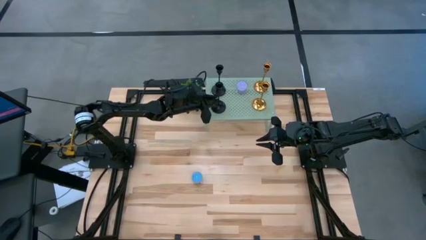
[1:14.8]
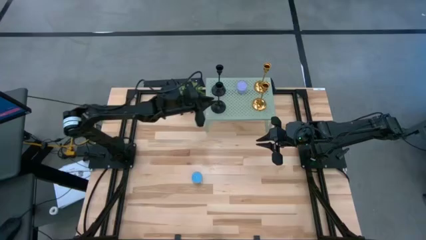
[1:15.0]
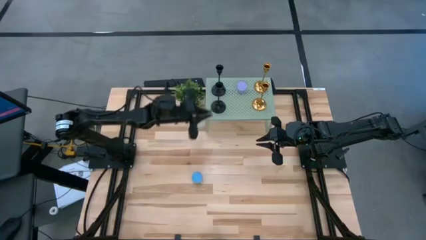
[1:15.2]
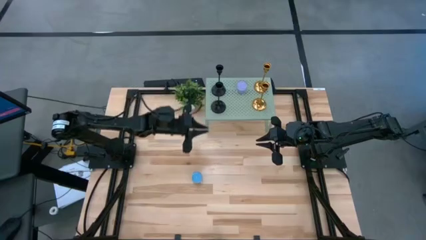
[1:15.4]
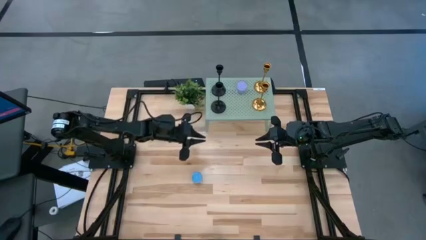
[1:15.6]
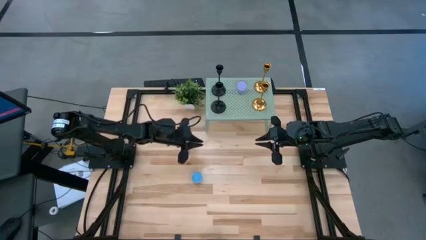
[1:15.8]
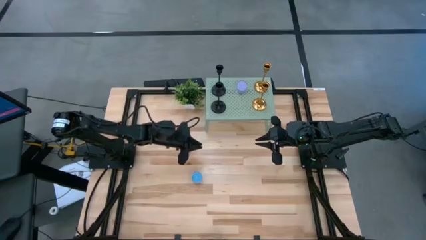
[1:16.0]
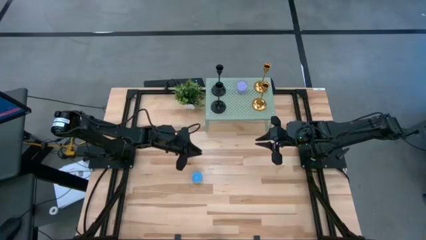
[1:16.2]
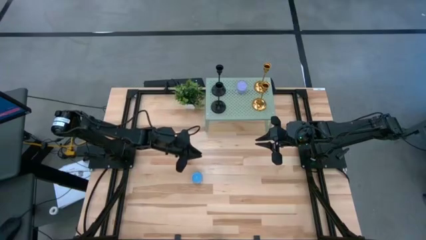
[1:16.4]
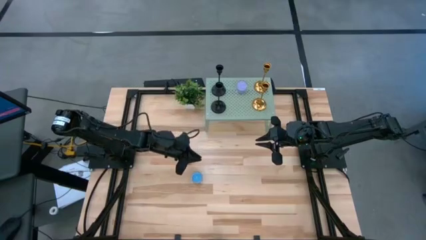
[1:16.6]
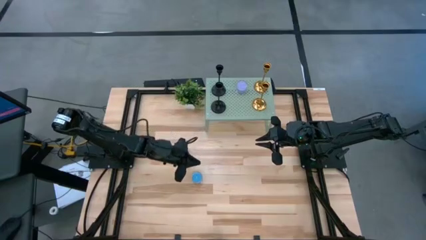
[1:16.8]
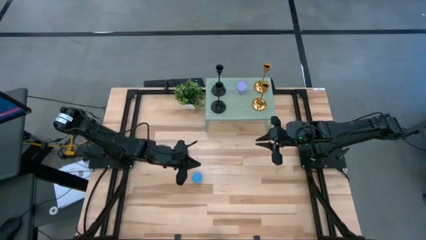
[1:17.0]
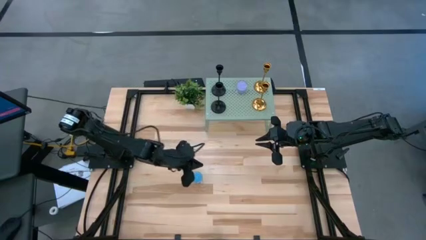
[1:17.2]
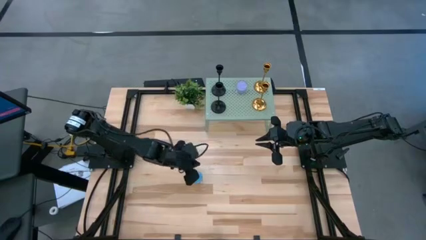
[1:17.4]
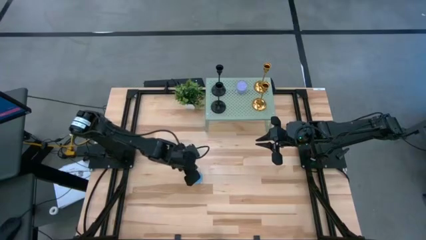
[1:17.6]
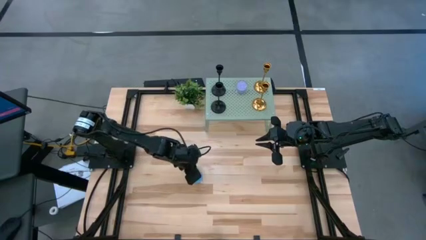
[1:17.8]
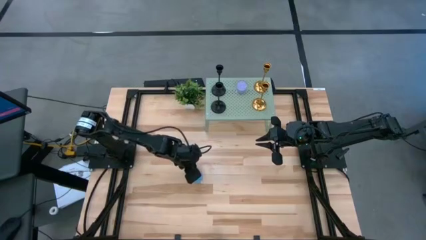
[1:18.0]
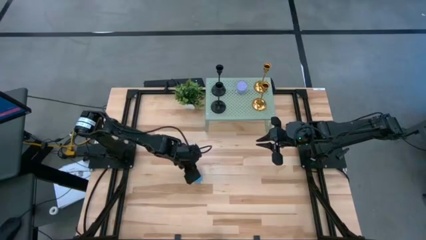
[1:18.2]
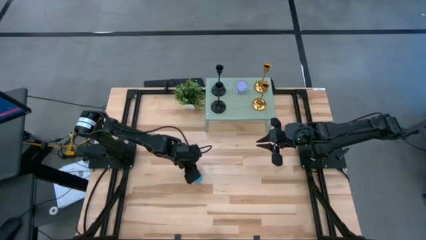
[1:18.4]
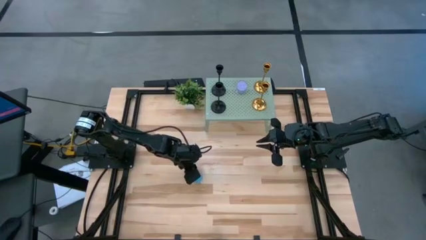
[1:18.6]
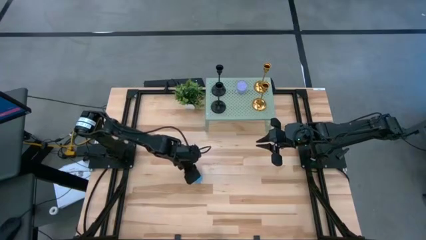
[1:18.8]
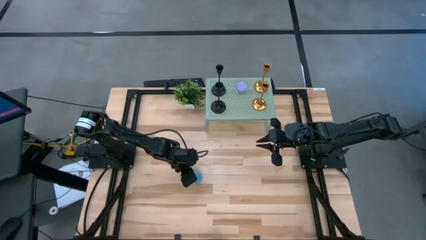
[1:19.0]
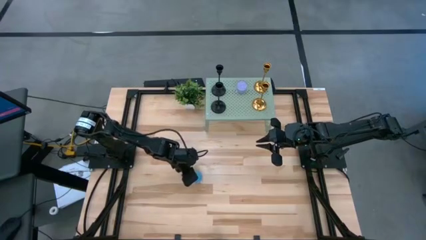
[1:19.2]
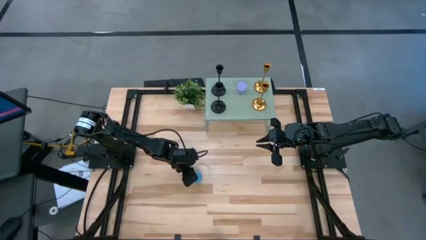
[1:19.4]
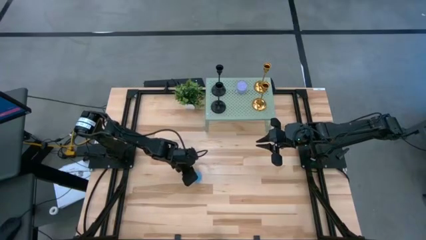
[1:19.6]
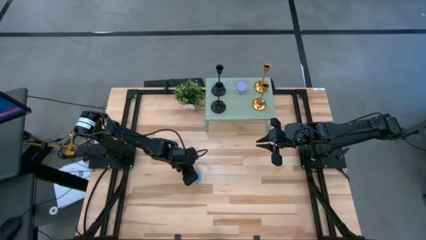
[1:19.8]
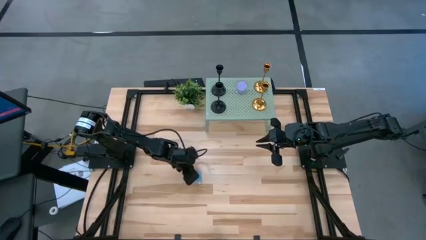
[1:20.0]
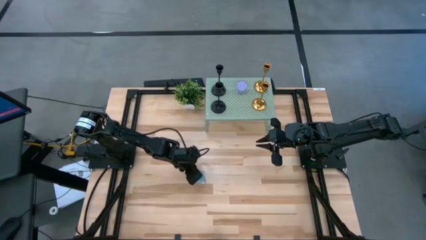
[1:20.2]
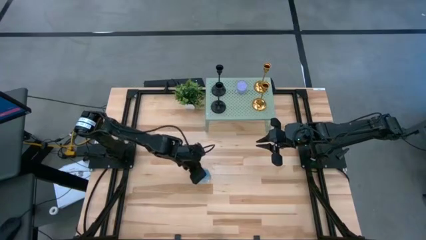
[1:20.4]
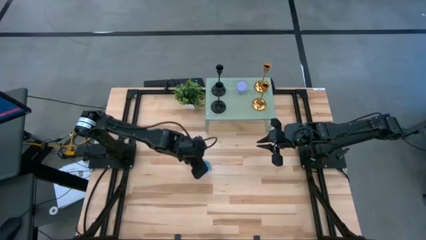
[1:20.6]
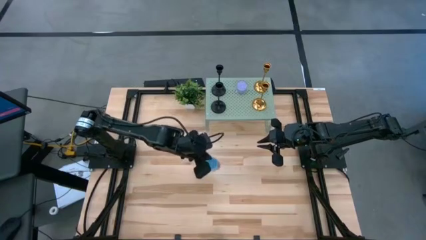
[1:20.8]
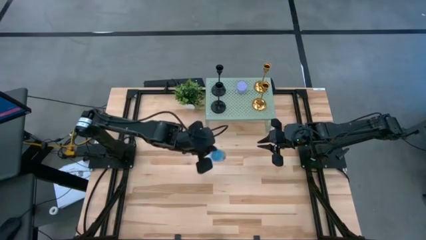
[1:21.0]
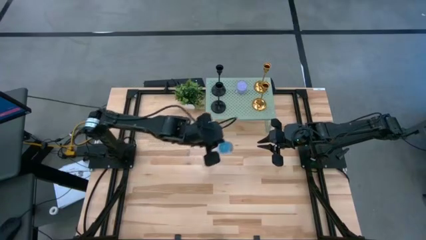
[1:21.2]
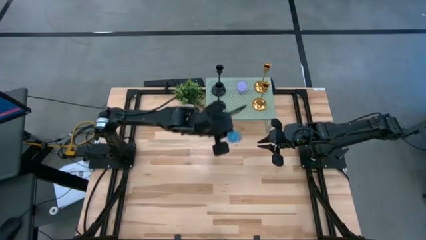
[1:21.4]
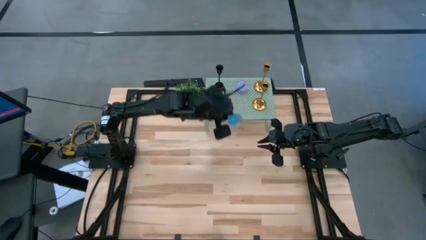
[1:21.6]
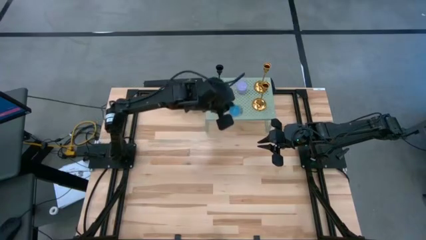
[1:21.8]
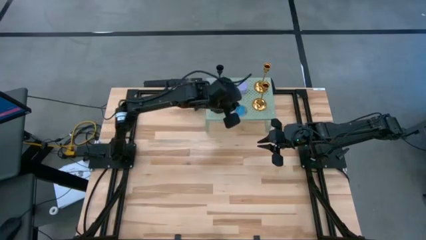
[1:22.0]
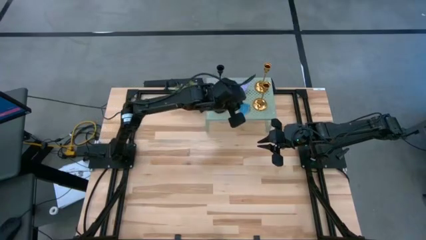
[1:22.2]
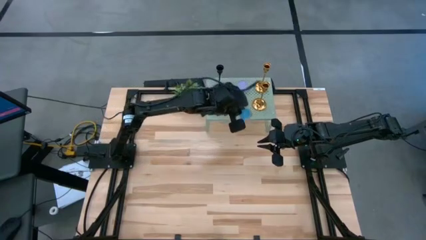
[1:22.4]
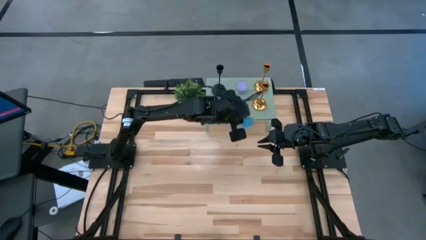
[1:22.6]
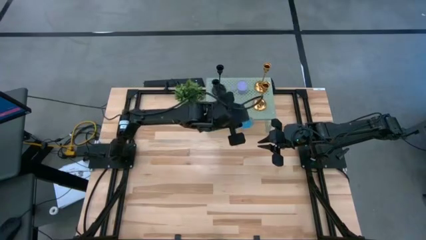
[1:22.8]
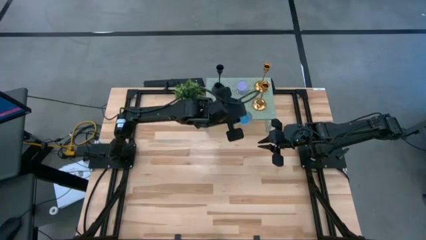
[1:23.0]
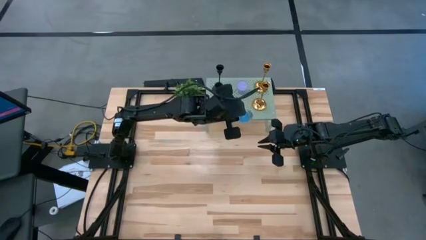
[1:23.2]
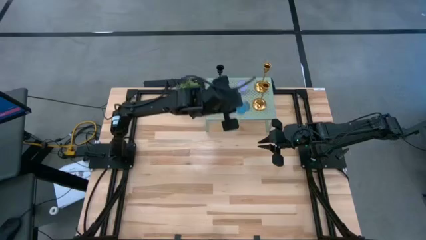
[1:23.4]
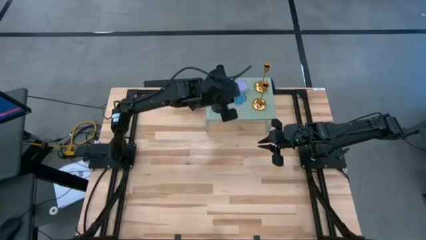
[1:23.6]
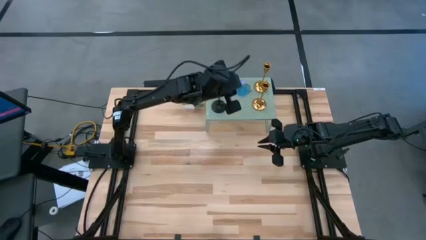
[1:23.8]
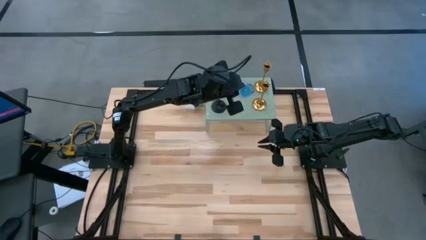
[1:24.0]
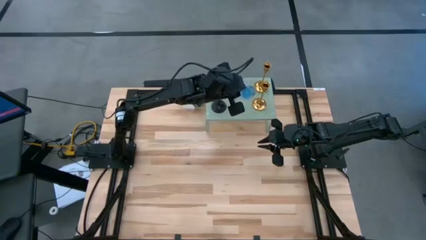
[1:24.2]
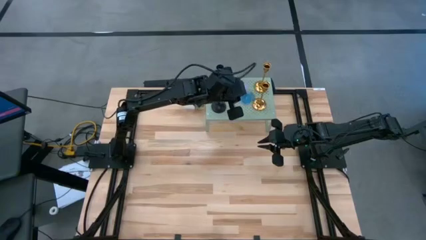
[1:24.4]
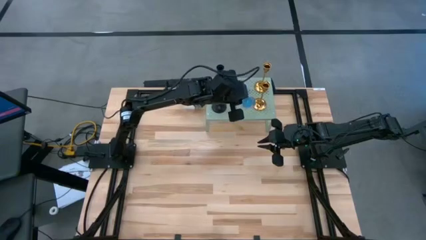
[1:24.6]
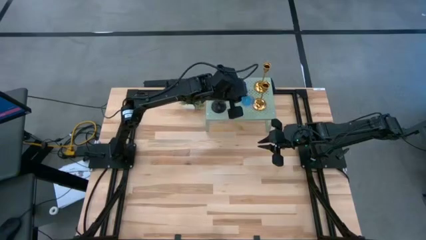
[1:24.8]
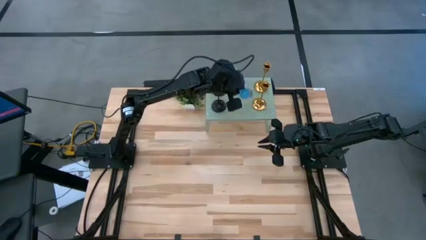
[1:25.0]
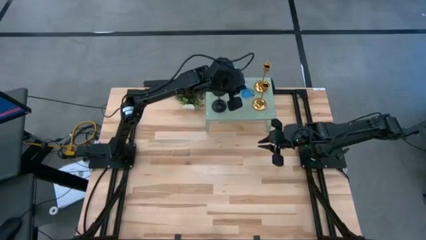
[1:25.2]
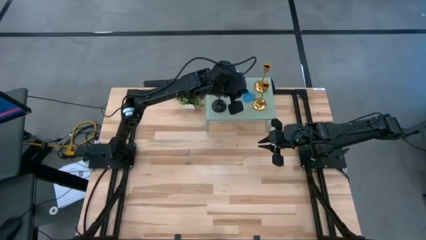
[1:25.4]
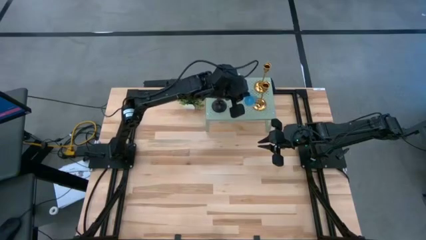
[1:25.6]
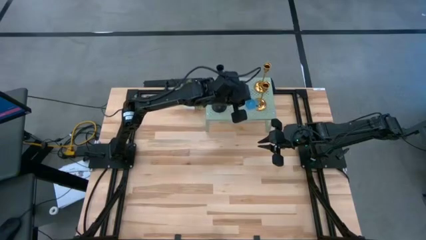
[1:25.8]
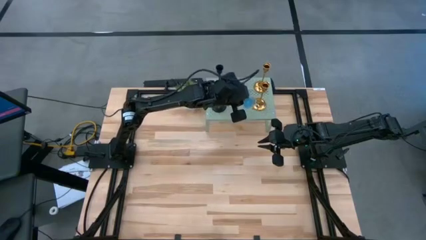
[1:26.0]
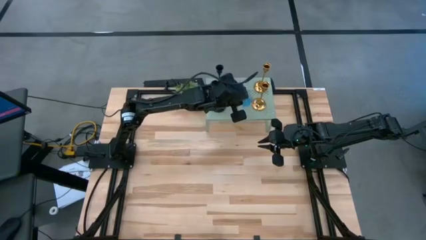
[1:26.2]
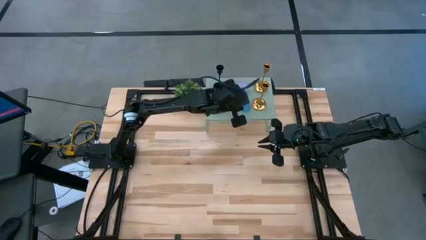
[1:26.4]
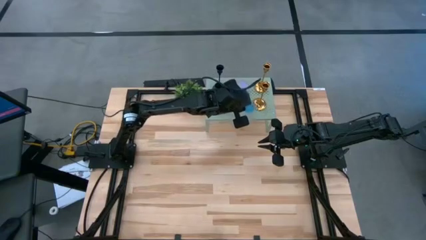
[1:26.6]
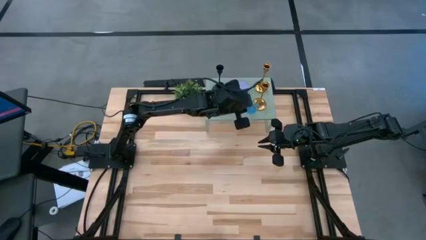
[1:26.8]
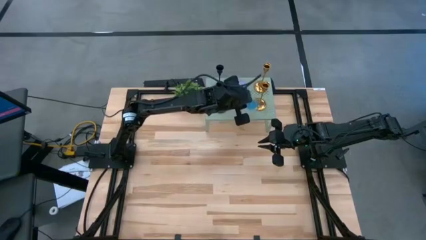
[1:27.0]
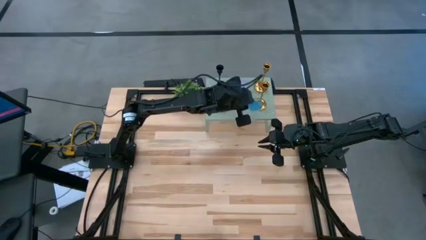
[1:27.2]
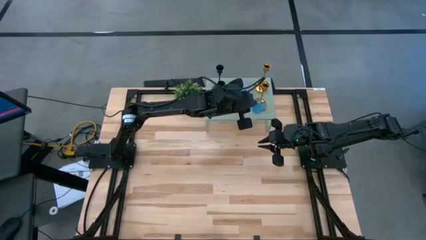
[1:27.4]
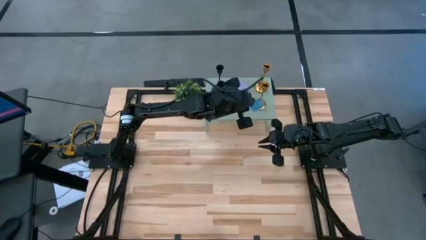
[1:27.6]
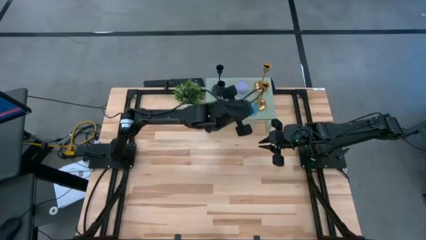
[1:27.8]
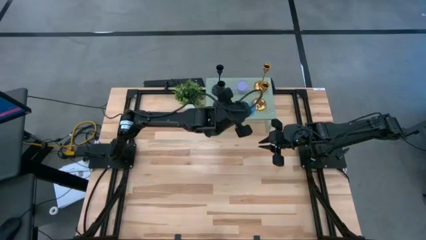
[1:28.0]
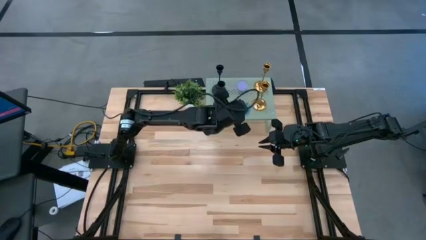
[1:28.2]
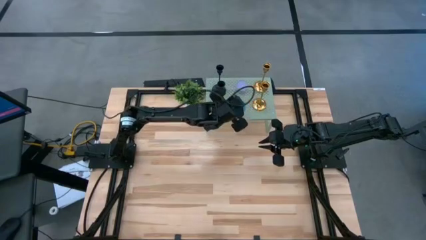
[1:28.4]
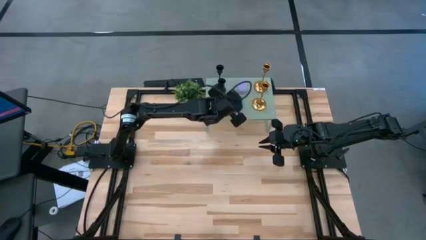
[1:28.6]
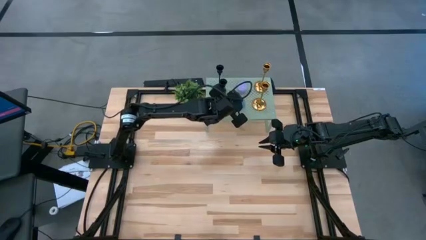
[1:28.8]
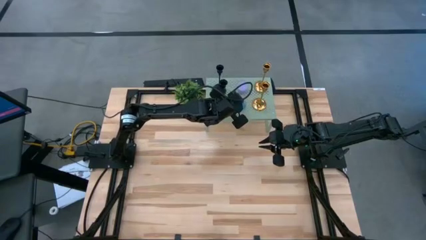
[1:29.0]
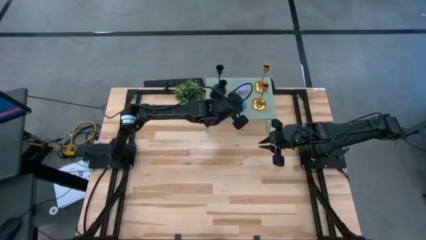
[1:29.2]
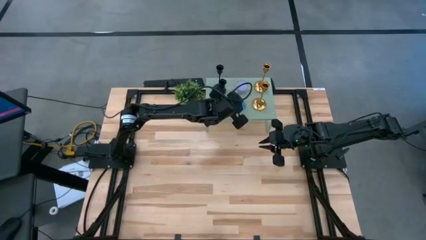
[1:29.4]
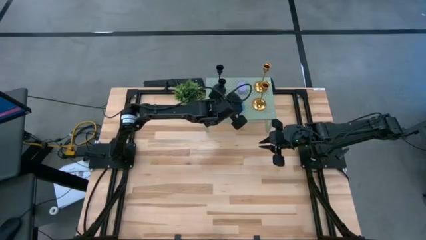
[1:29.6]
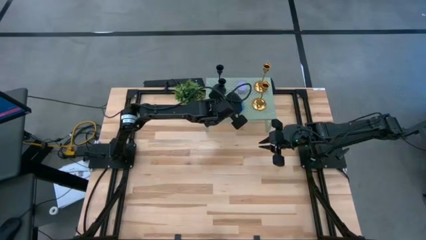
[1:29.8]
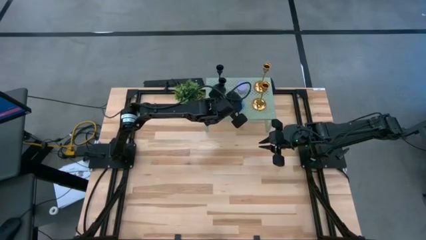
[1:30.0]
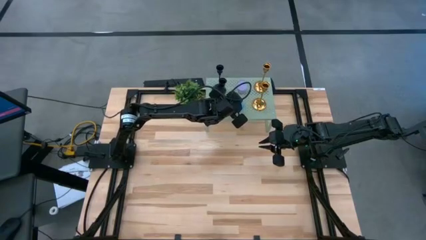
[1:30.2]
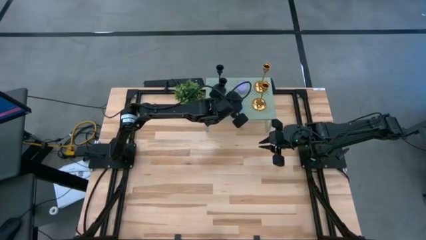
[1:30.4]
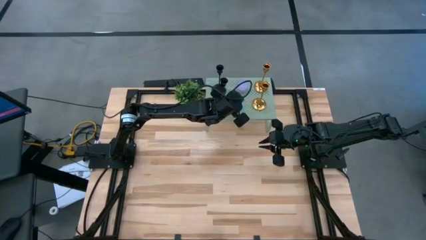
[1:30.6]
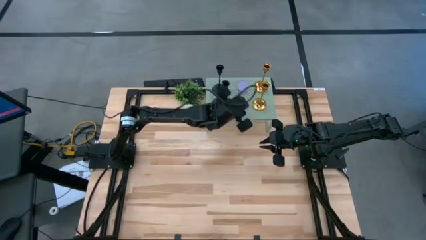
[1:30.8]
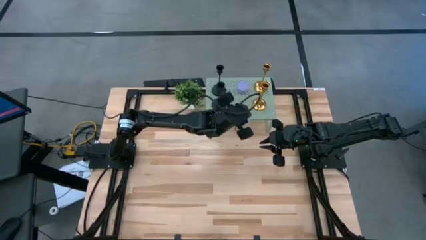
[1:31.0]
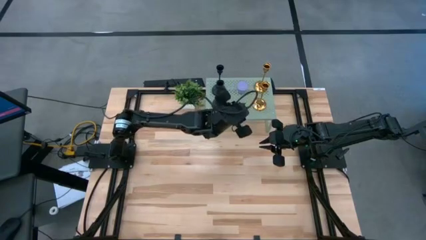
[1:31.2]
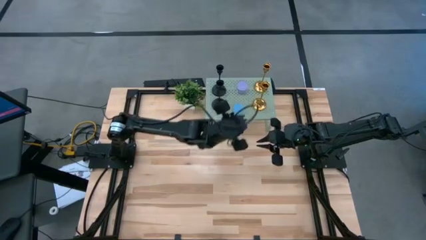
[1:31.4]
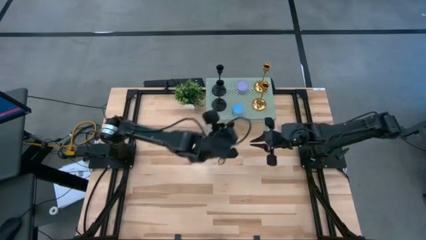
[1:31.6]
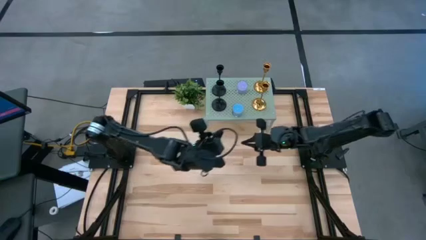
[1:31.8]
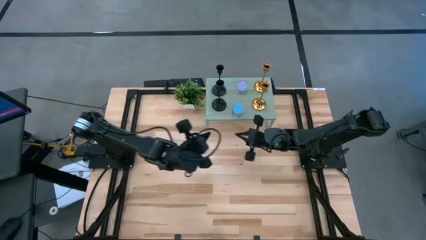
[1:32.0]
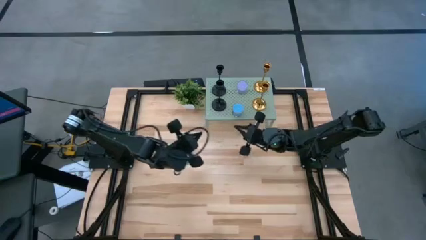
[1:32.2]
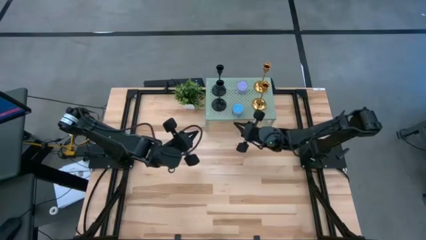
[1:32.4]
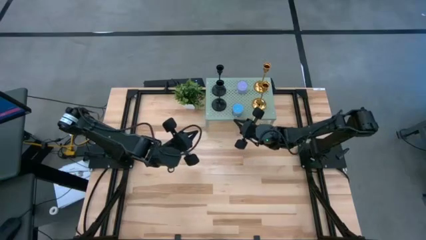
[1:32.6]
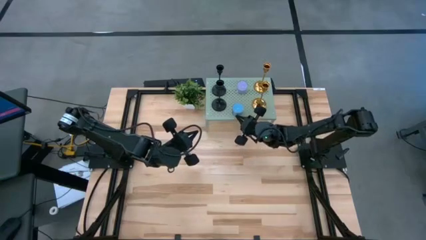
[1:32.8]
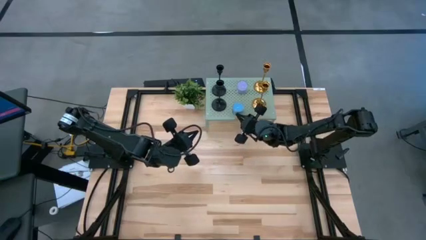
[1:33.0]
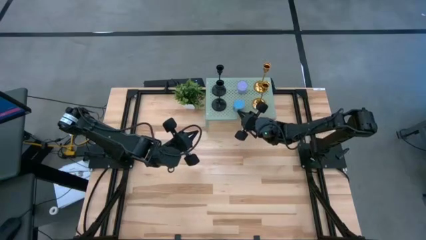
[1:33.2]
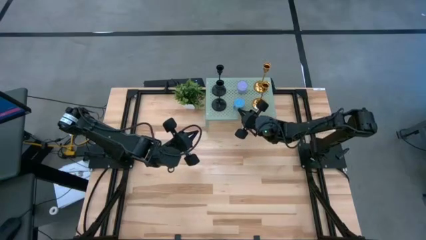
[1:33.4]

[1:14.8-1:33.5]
Task: Pick & Place candle stick holders
Align the blue scented candle with the violet scented candle on the shelf
